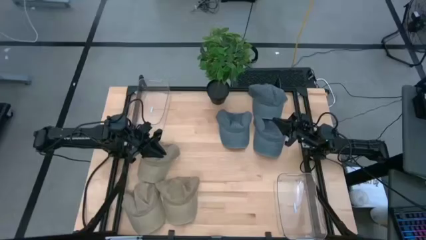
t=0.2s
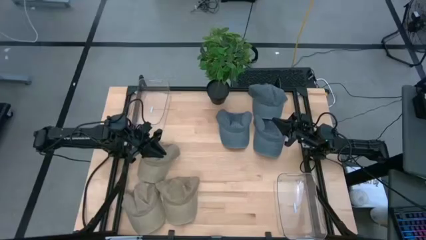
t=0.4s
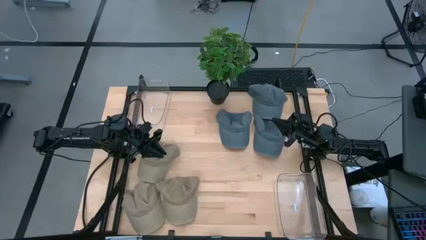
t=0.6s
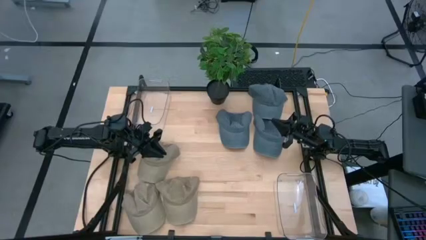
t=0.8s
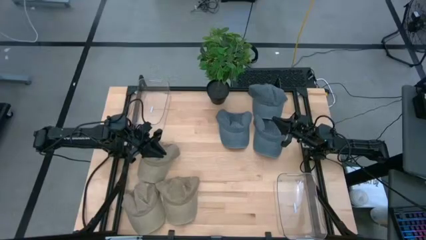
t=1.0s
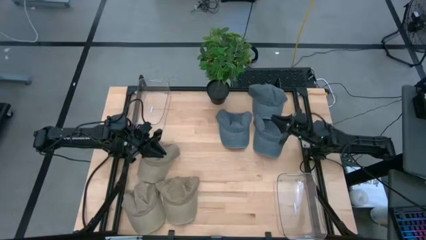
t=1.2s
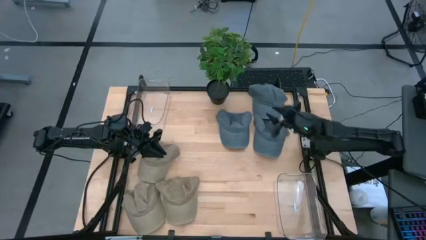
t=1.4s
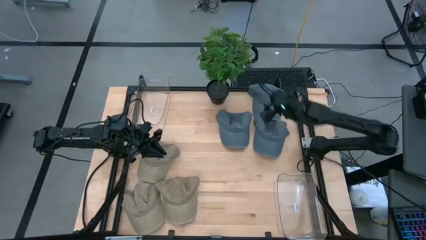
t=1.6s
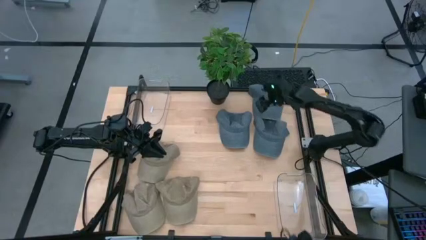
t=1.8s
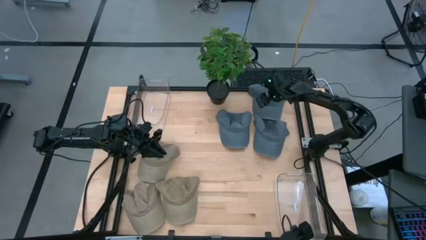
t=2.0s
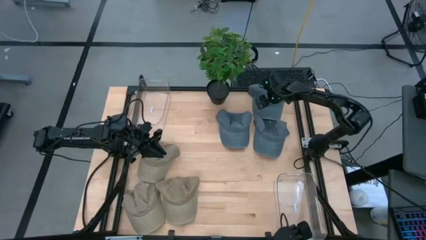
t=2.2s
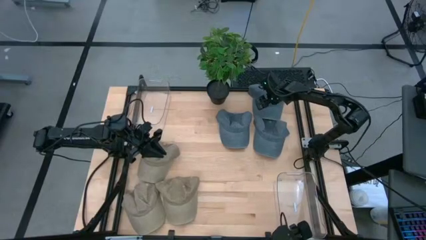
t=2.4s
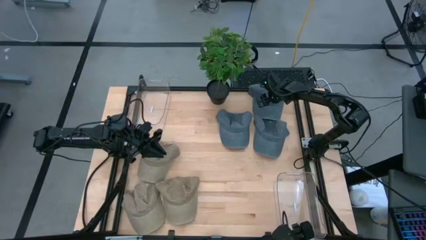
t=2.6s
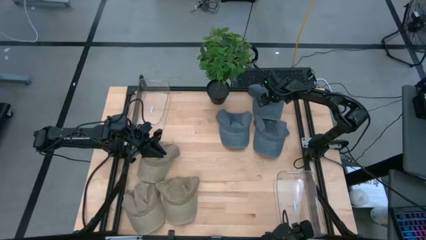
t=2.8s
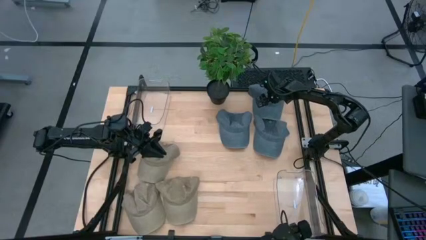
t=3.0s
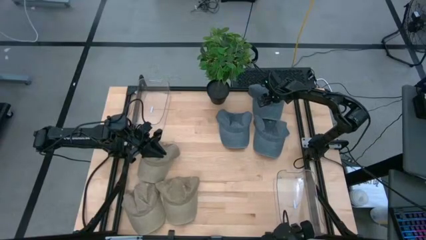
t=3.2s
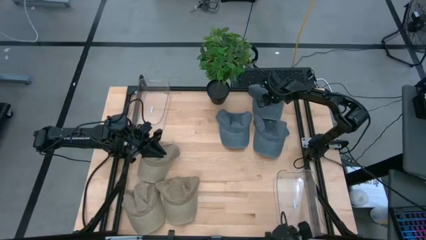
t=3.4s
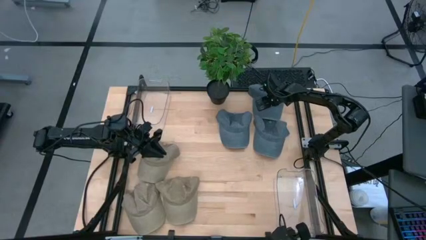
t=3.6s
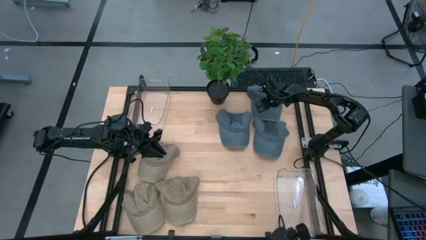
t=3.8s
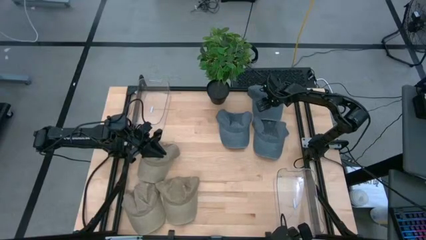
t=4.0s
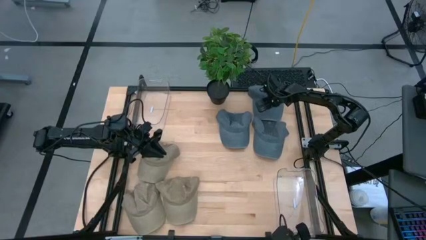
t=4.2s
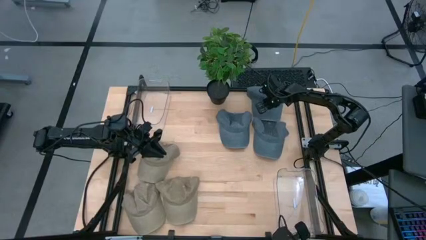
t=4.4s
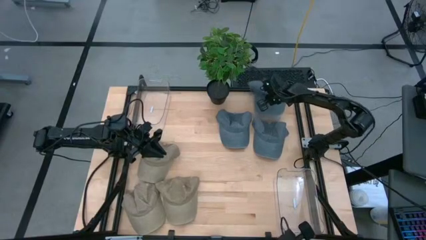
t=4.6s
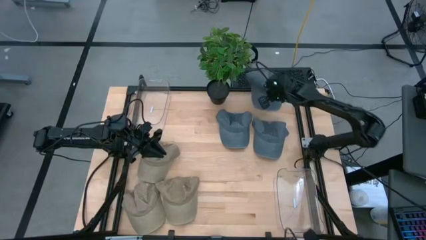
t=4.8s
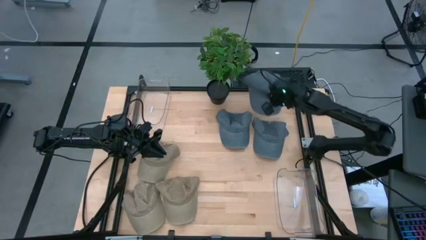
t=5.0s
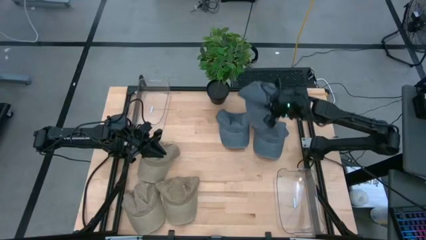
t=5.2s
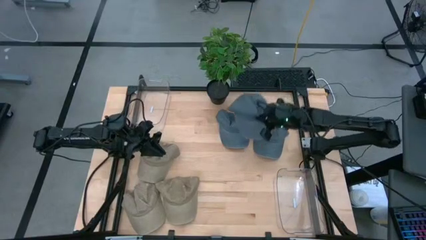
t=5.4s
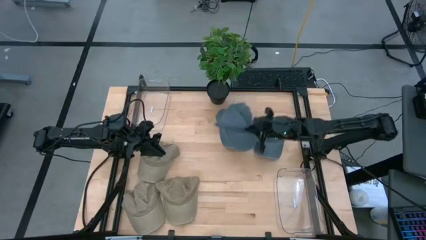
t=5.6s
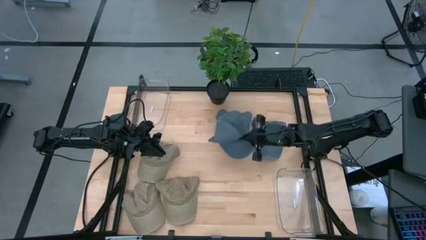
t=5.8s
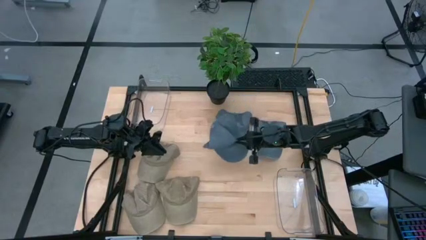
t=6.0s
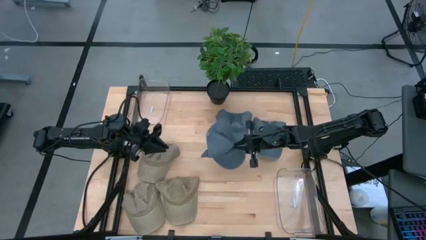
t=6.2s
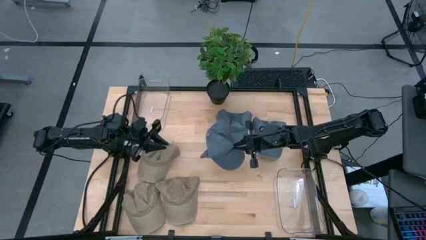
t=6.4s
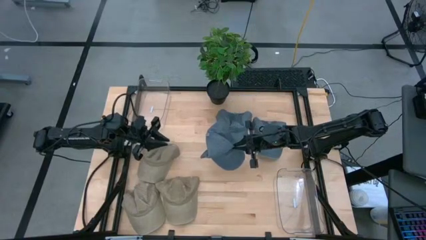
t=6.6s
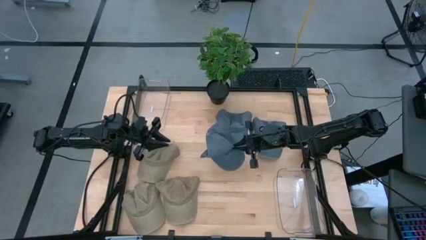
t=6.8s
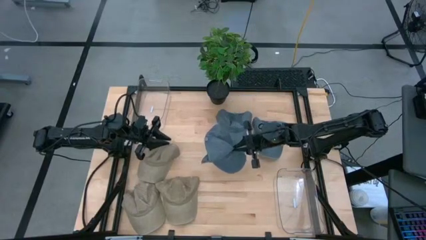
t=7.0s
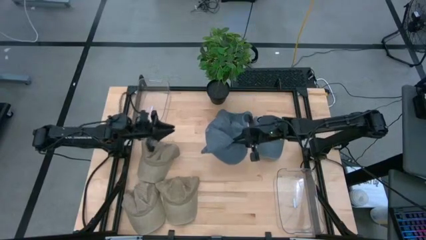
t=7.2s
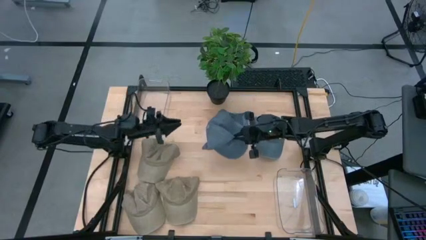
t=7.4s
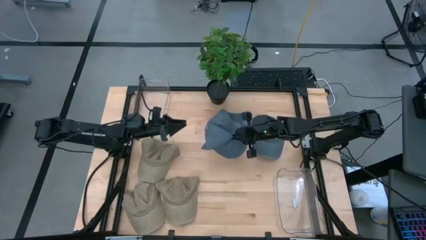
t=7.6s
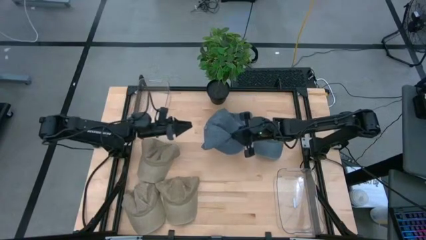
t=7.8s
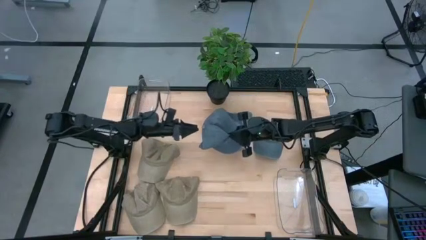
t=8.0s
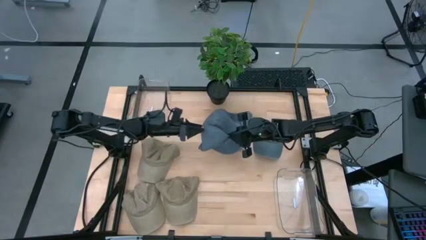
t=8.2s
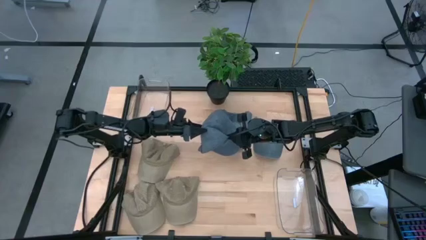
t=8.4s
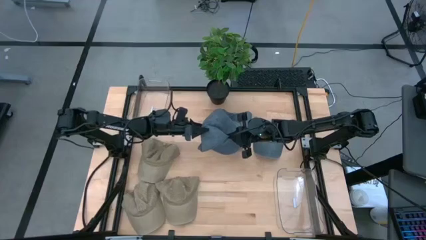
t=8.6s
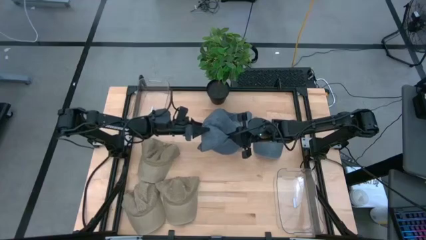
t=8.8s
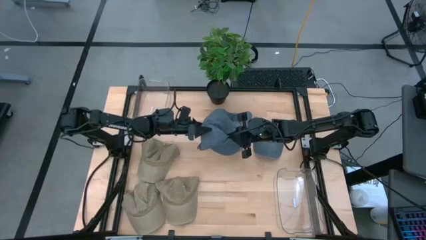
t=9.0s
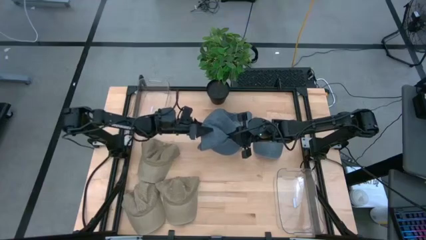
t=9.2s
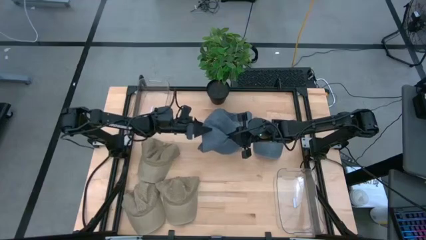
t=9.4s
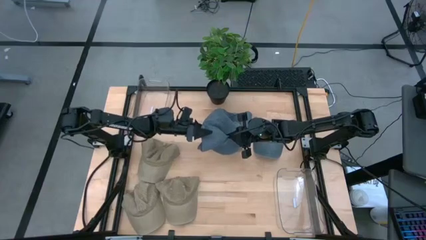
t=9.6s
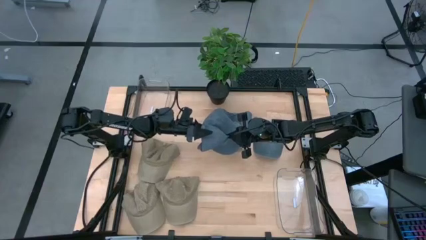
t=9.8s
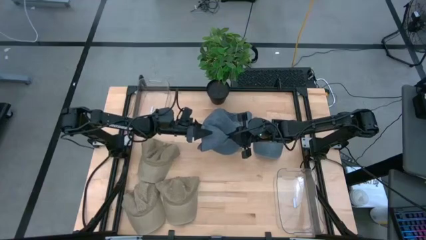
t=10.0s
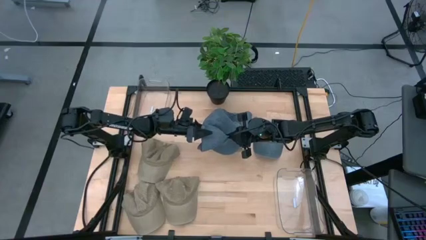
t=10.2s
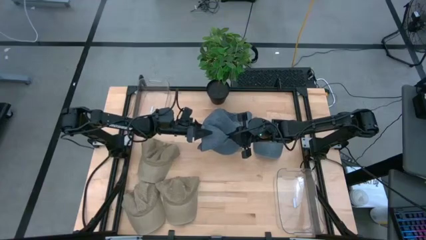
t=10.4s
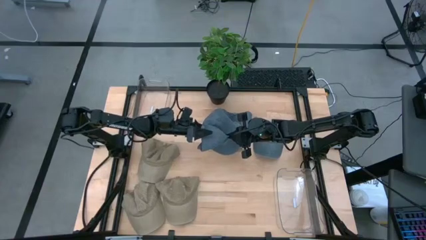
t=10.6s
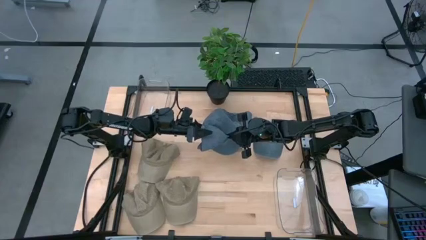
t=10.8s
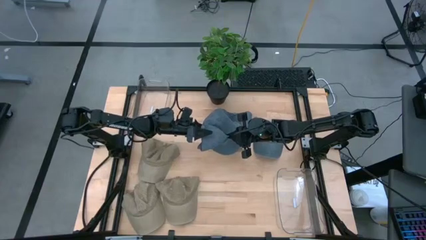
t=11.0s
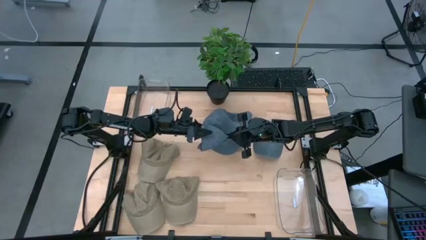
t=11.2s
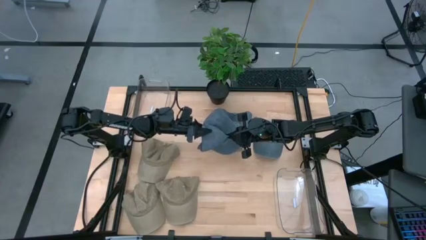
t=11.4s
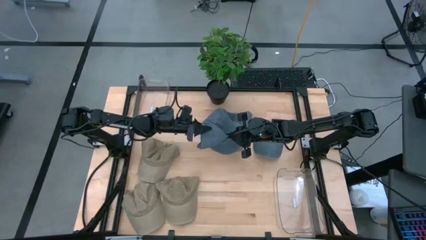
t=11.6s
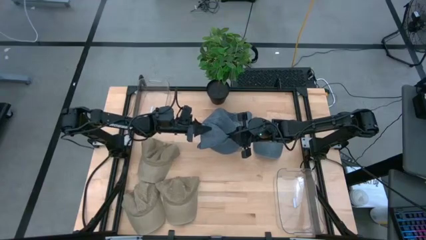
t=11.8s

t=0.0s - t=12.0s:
Task: Pick & Place hat
Put the top blue cap into the left transparent bin
